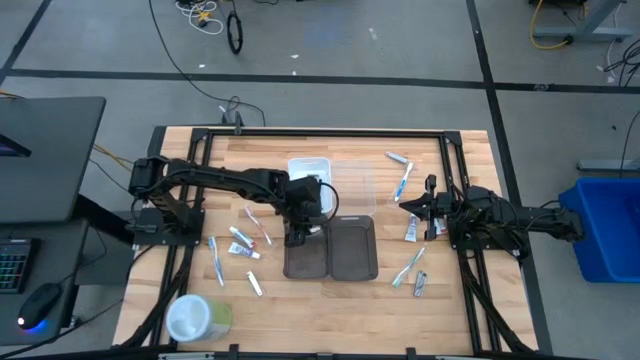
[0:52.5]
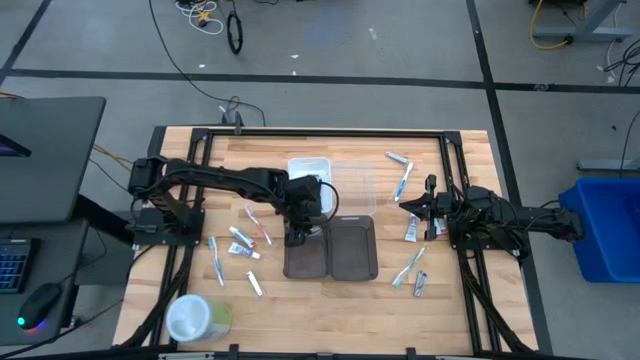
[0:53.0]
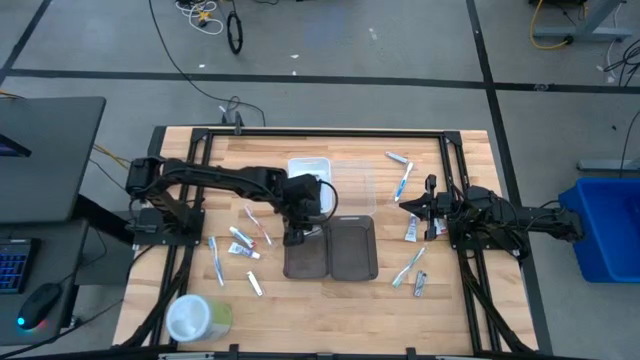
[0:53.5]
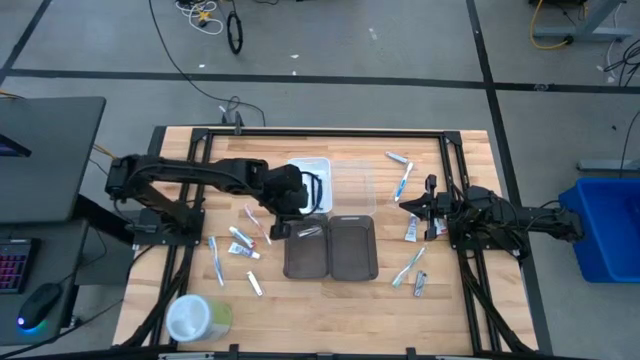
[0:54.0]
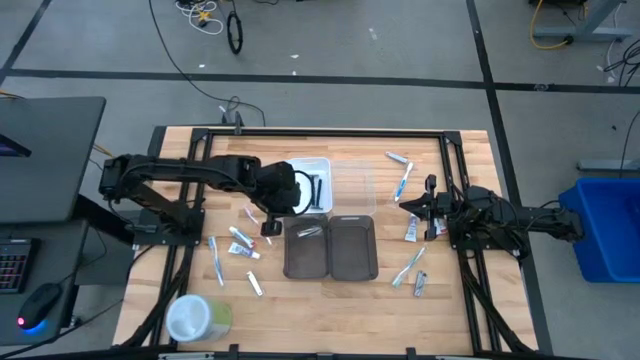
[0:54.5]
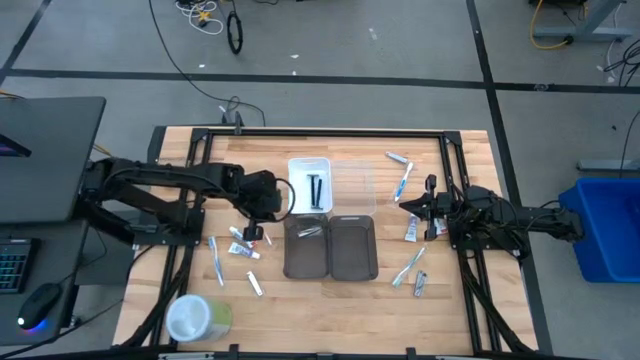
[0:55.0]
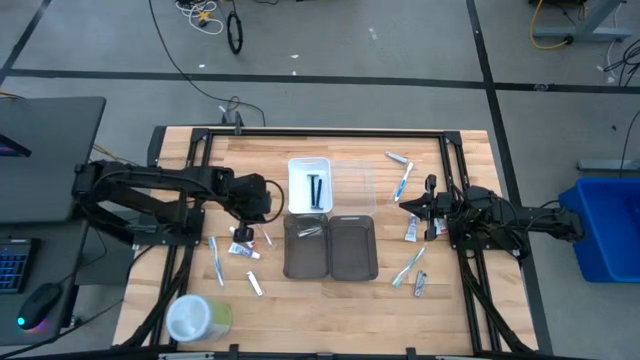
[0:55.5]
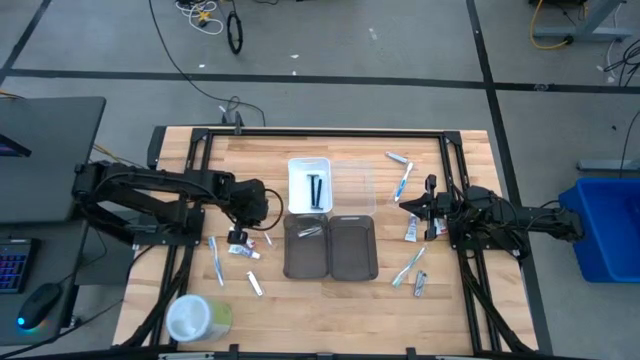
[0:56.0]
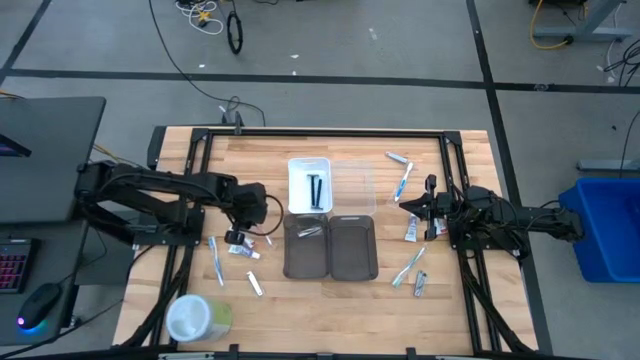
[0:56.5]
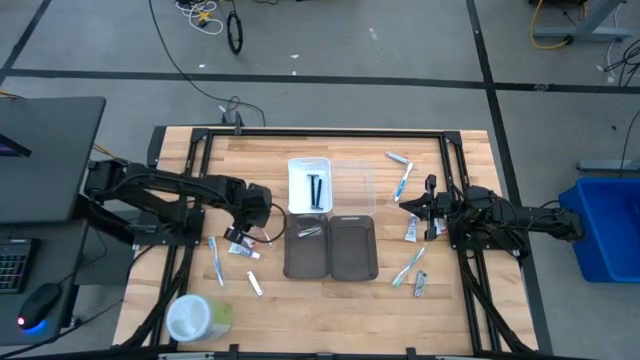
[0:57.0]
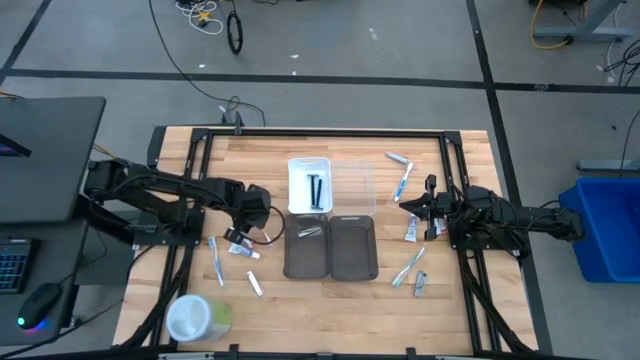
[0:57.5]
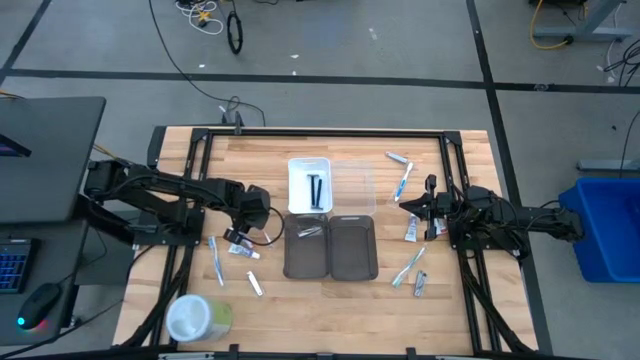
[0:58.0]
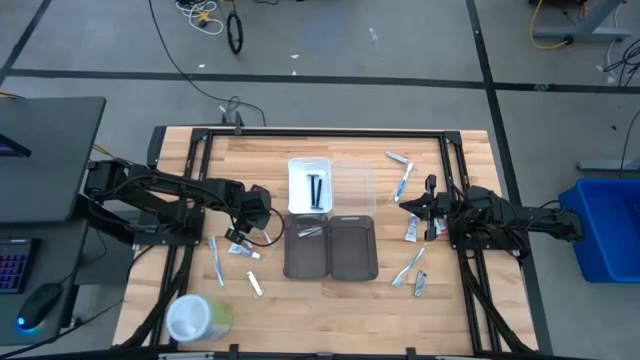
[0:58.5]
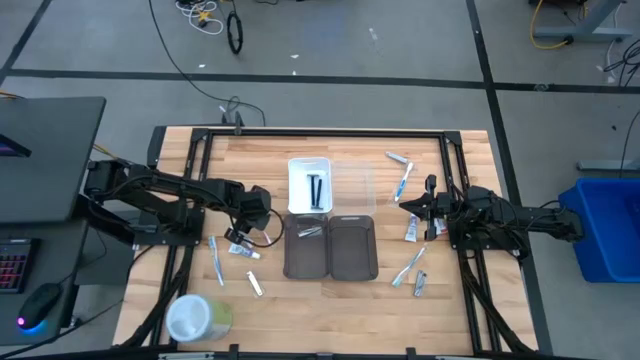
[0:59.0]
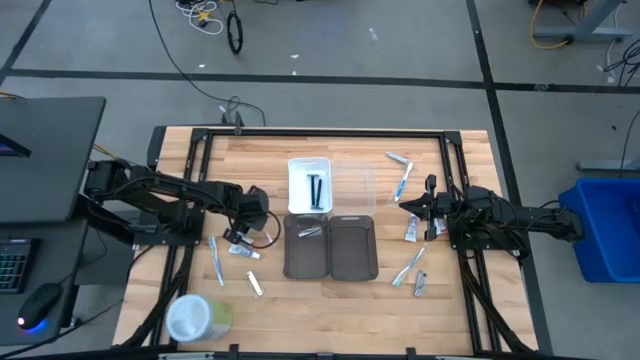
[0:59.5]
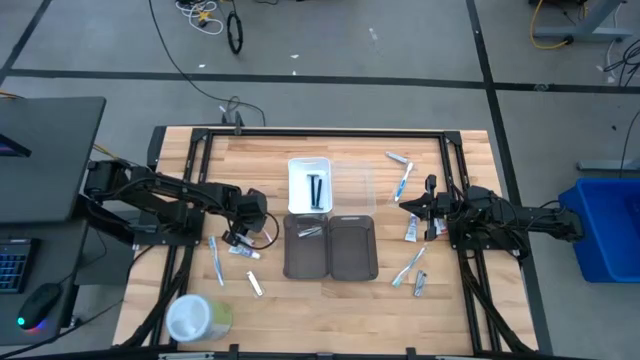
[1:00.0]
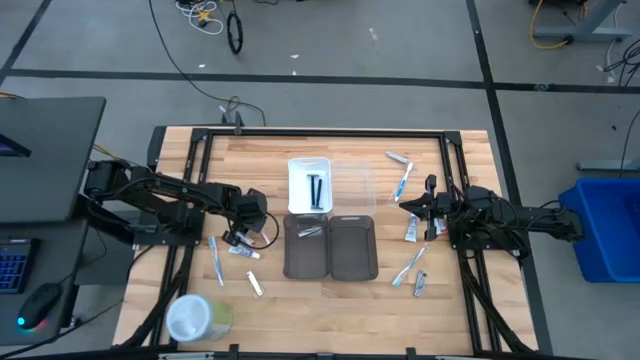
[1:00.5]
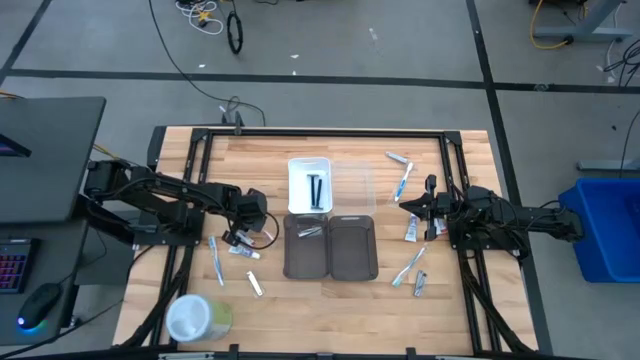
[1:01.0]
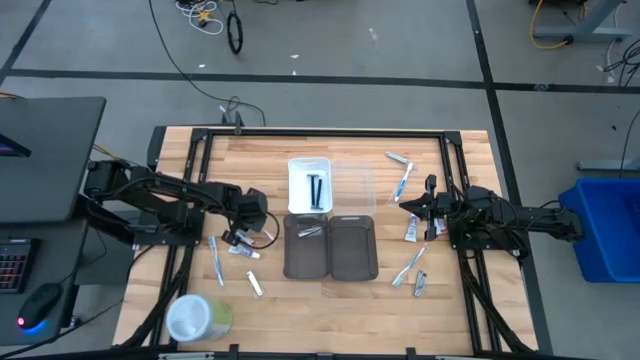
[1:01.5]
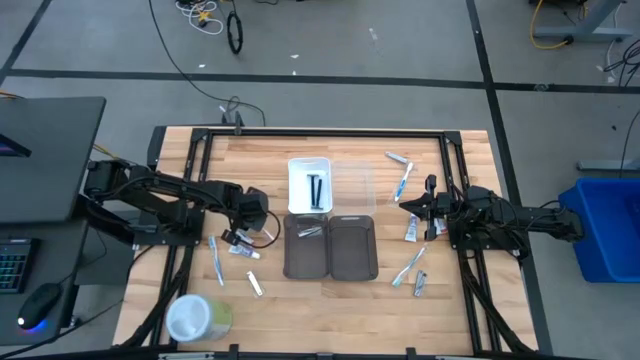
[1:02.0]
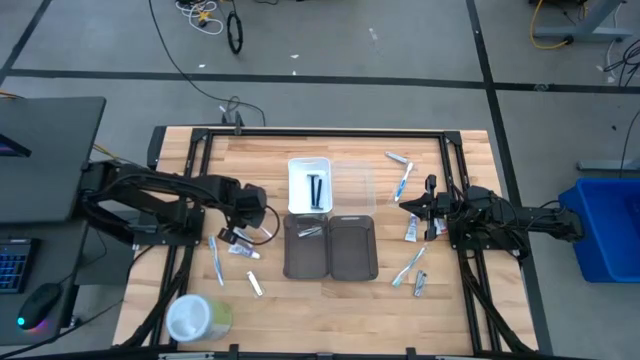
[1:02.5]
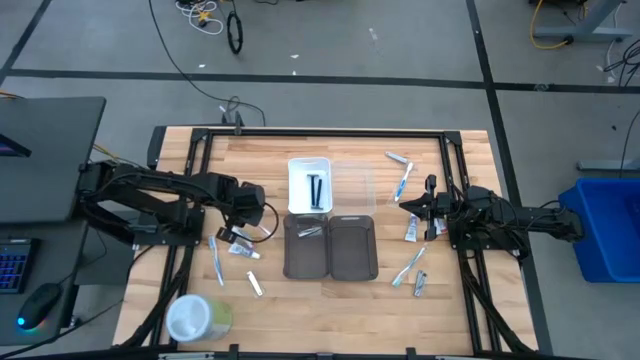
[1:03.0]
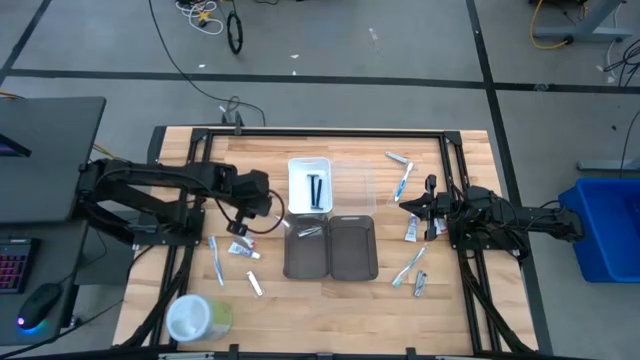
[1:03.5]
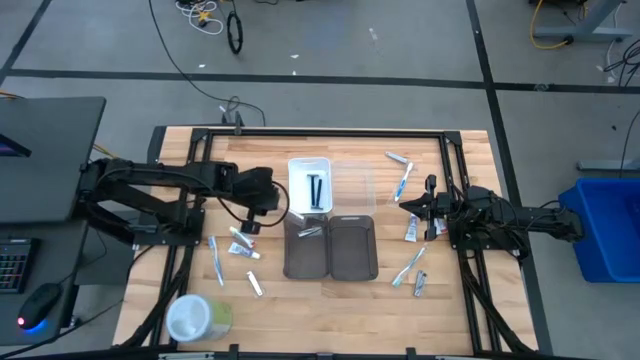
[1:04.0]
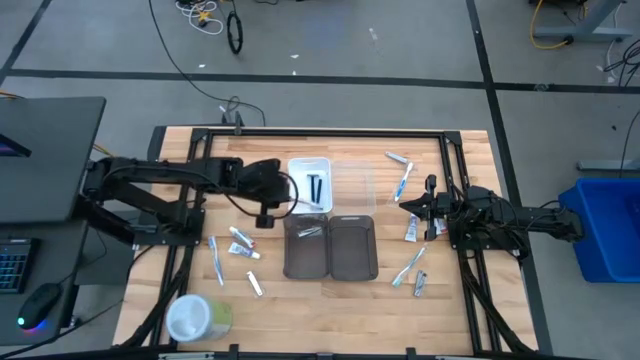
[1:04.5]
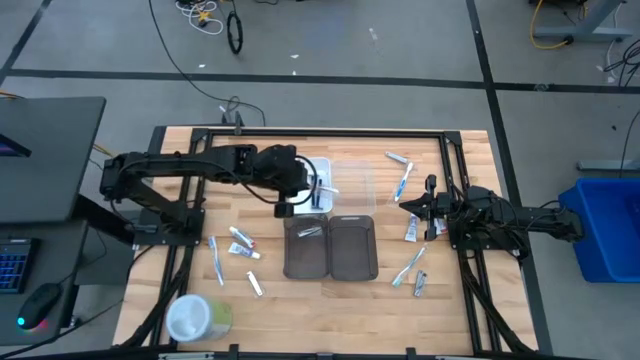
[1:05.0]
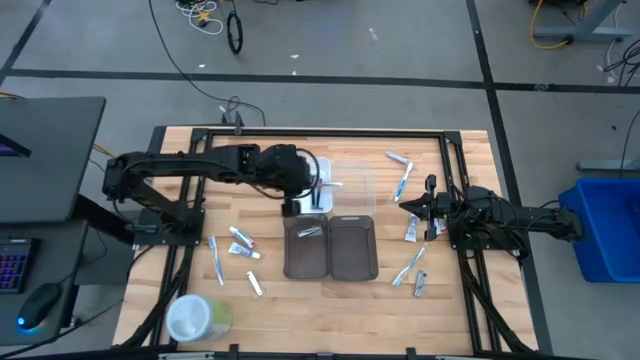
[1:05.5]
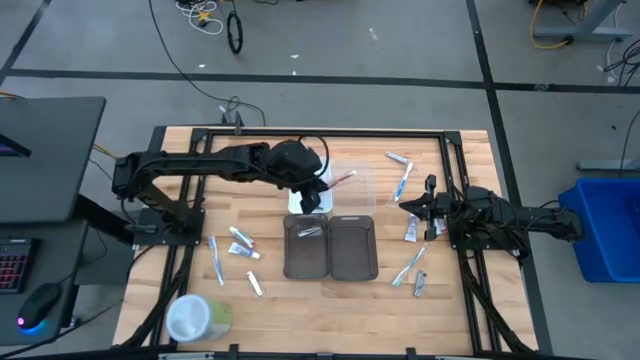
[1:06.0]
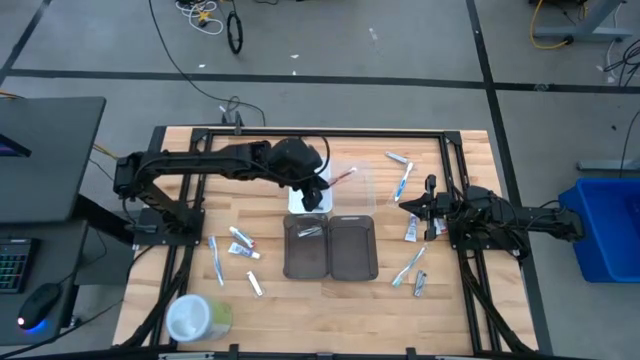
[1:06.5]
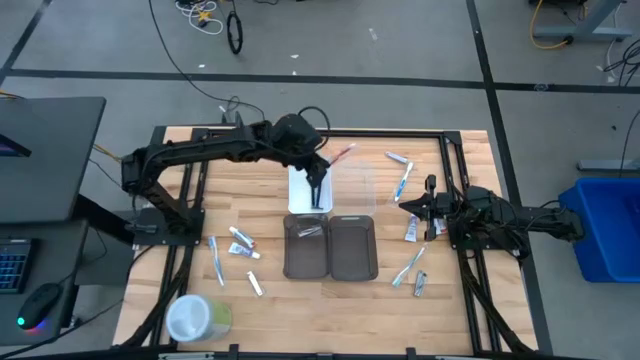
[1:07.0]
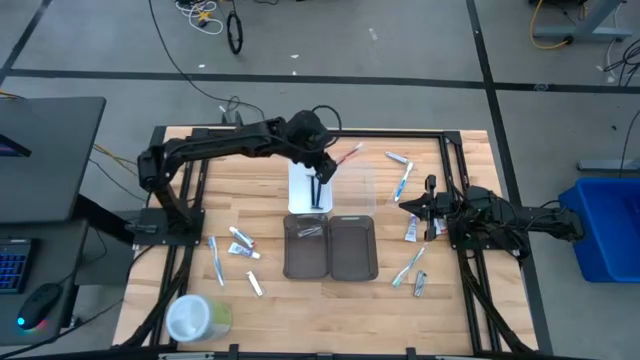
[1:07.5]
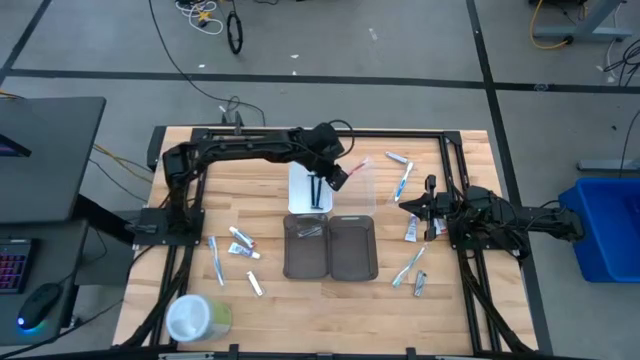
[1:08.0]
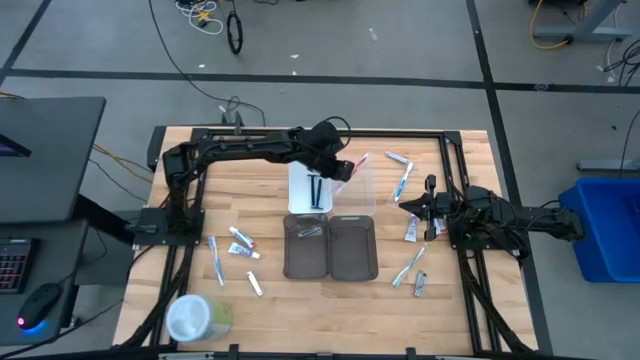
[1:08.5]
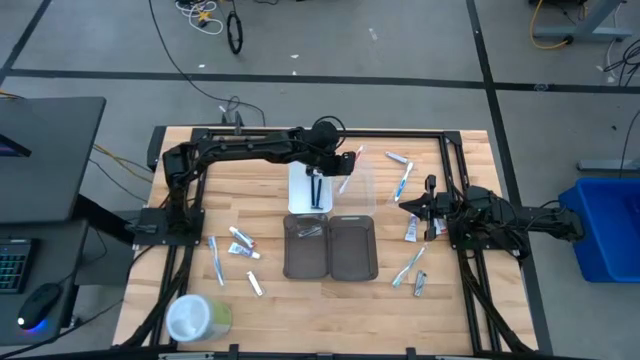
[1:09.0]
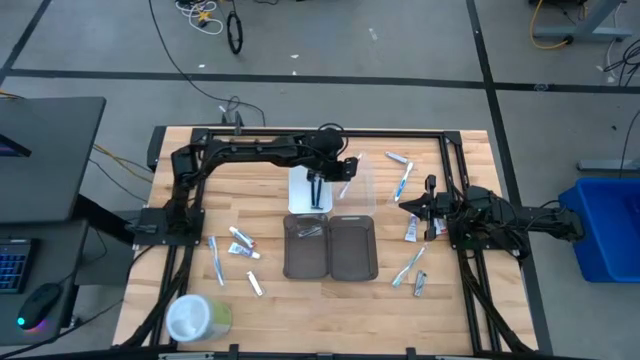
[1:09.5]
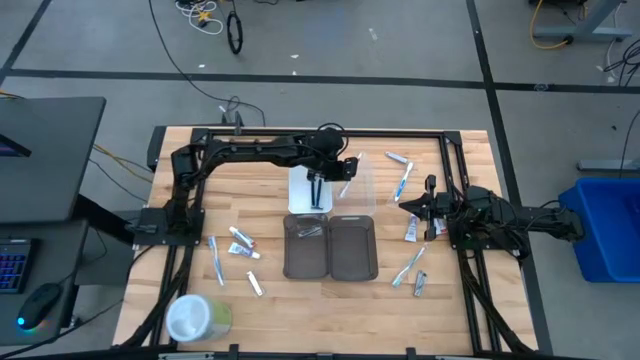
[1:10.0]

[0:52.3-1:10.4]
Task: Pick & Place Travel size toiletries
Put the orange toothbrush into the transparent bin

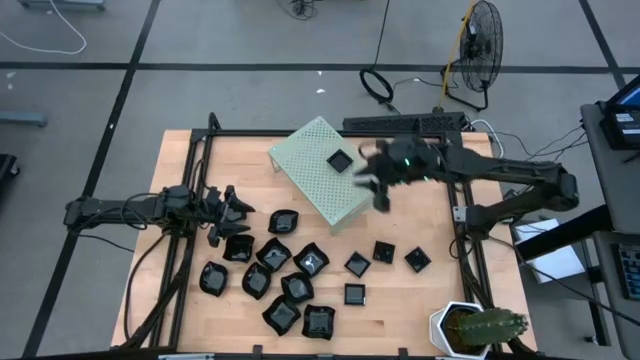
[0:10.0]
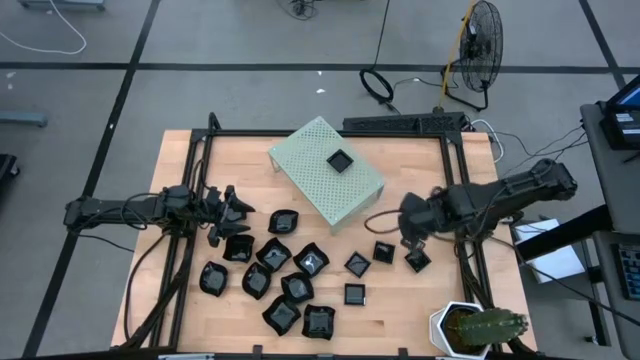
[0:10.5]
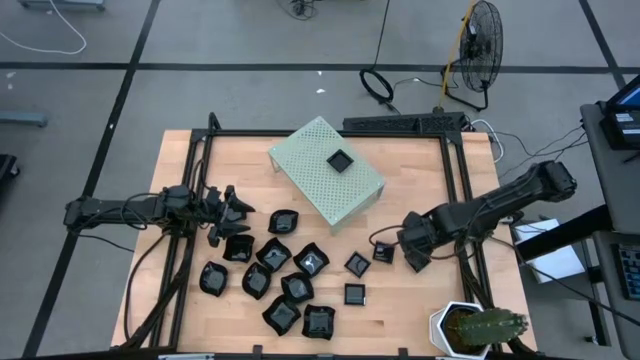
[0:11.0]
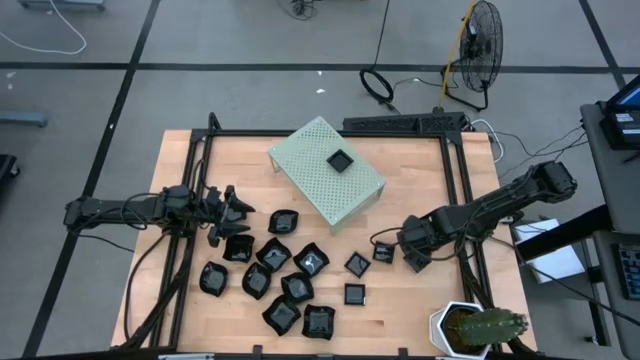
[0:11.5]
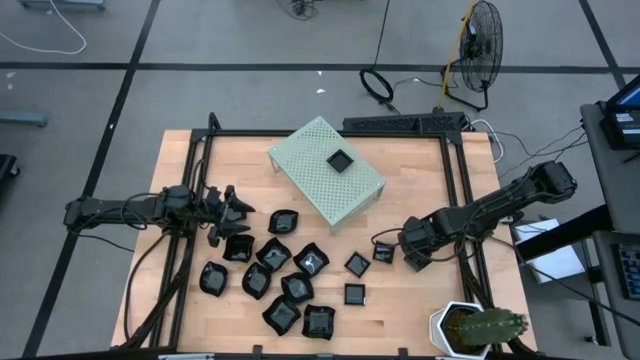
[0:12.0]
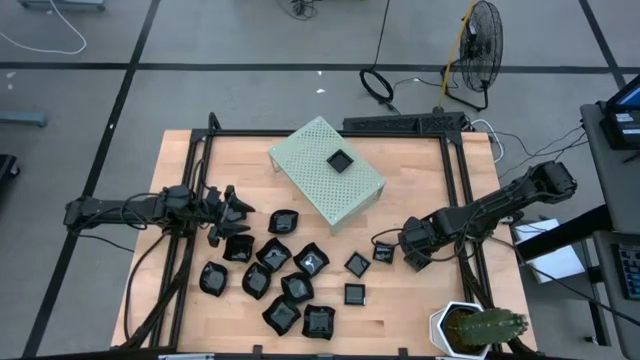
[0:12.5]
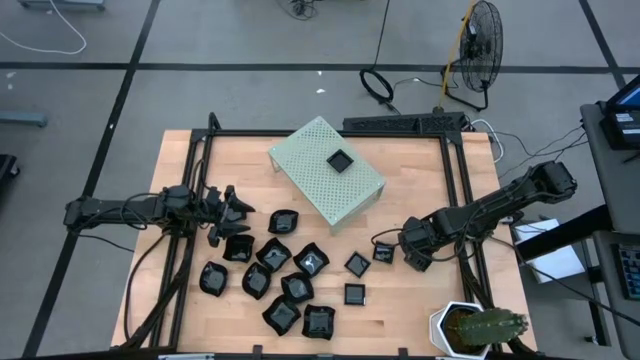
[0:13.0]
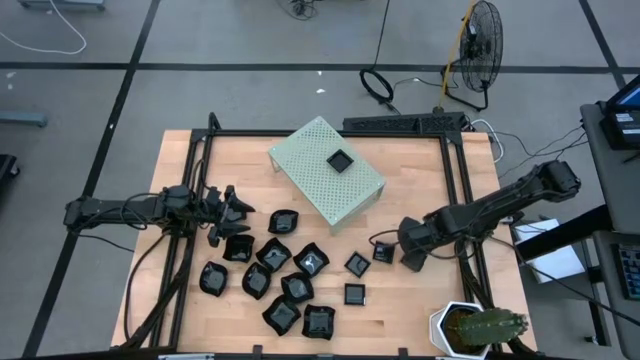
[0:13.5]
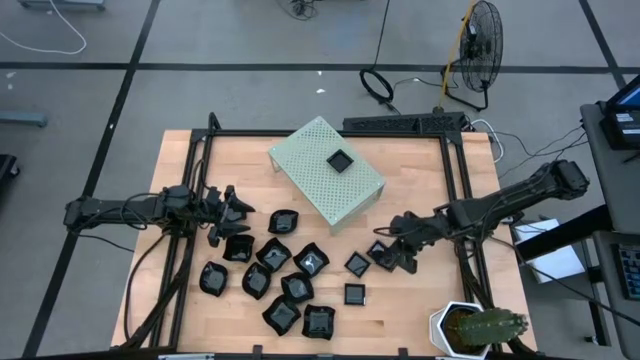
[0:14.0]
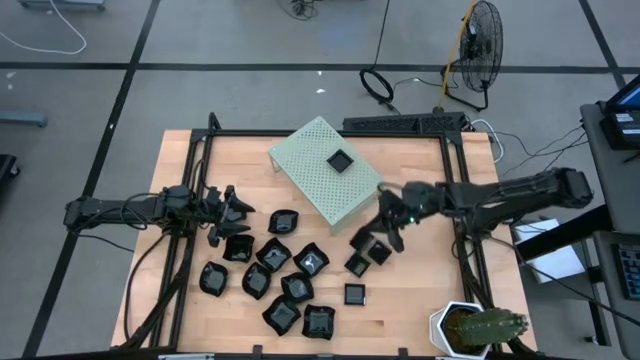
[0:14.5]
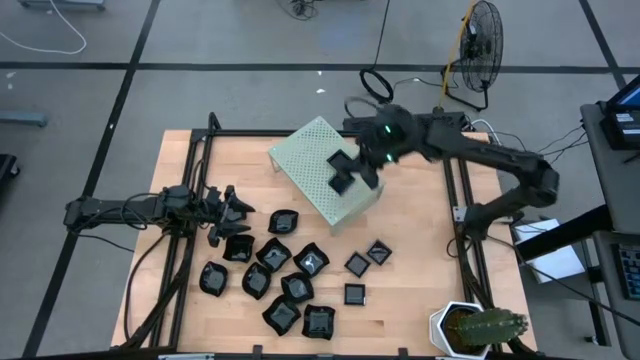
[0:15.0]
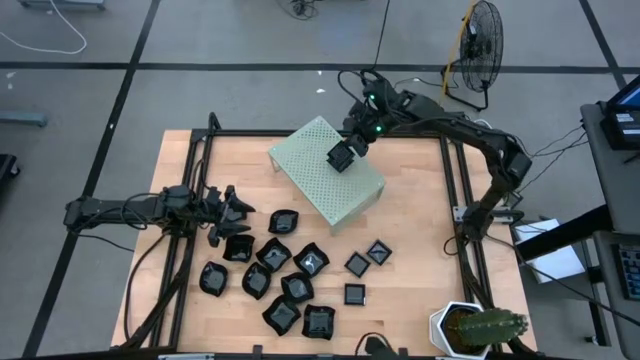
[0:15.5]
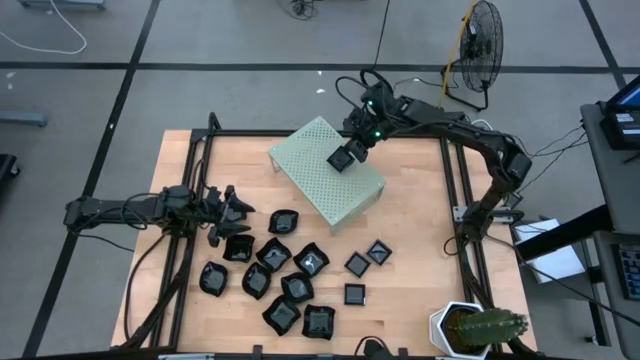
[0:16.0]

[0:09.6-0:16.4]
Task: Pick & Place Mini shaped plates
Stack the square plate on top of the other square plate on the shelf
